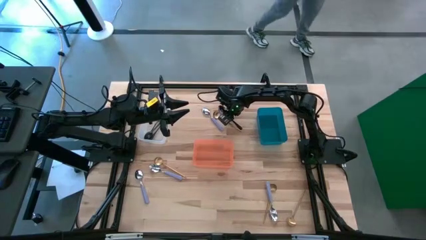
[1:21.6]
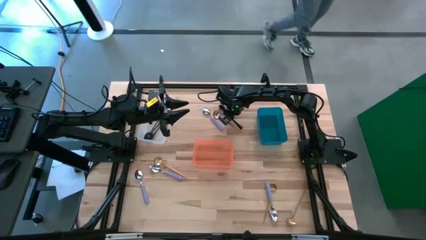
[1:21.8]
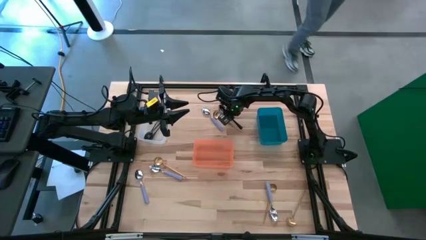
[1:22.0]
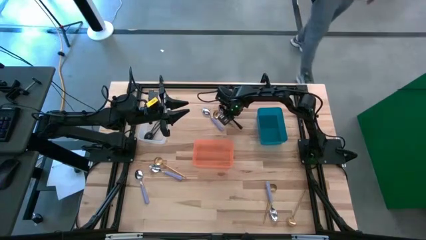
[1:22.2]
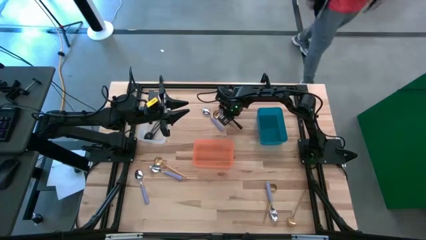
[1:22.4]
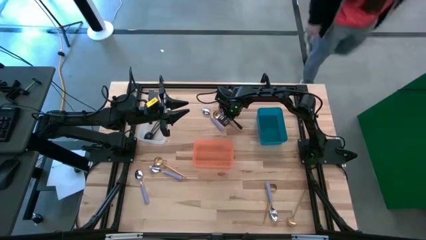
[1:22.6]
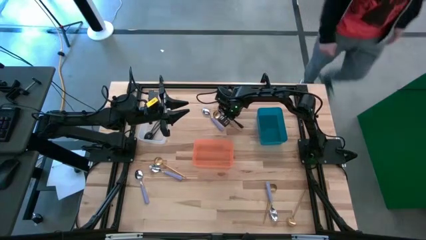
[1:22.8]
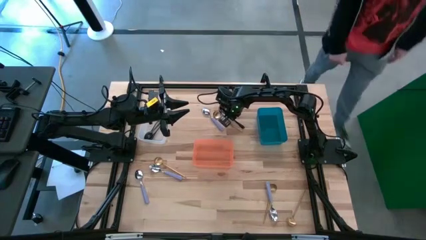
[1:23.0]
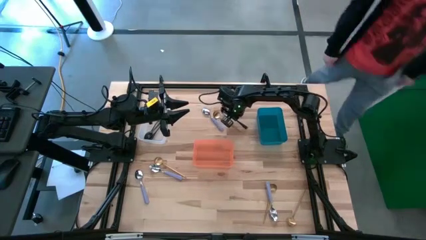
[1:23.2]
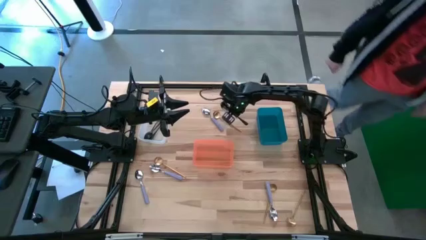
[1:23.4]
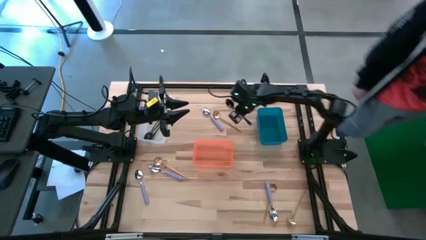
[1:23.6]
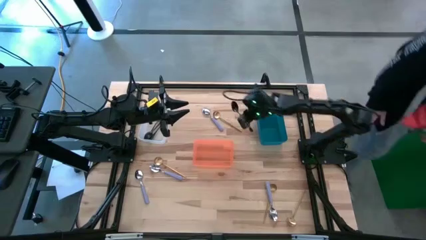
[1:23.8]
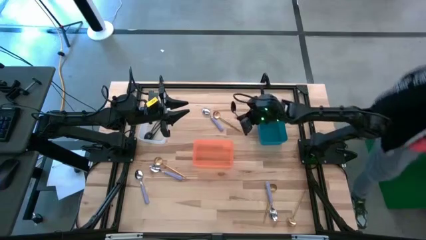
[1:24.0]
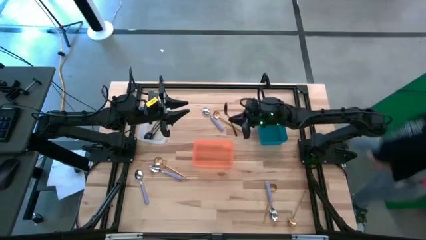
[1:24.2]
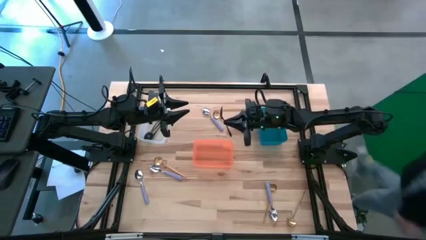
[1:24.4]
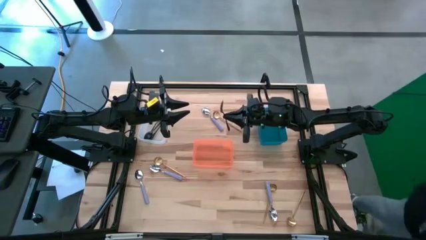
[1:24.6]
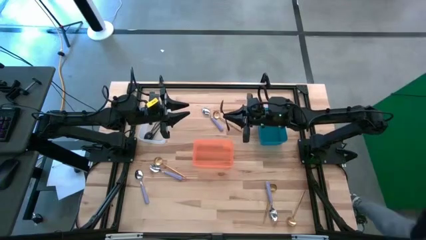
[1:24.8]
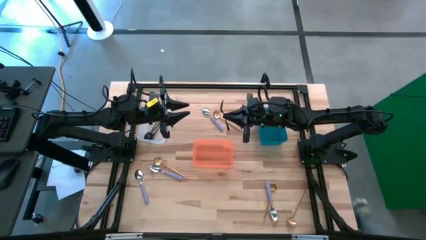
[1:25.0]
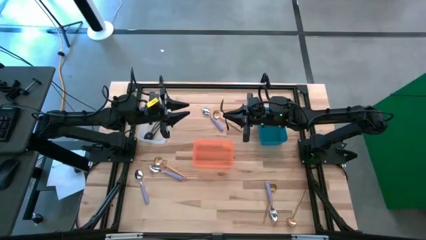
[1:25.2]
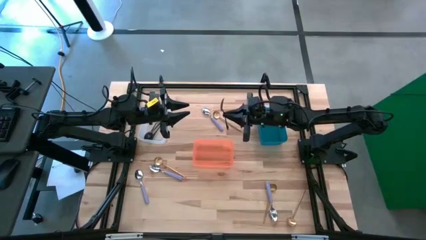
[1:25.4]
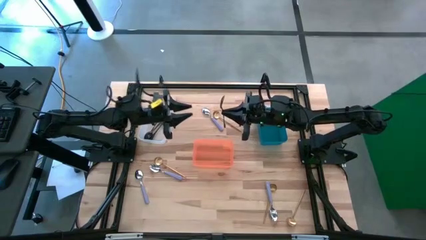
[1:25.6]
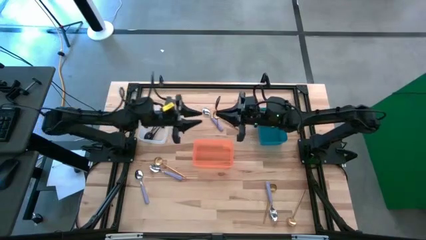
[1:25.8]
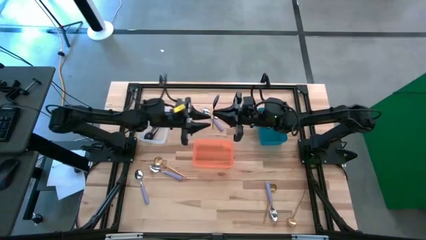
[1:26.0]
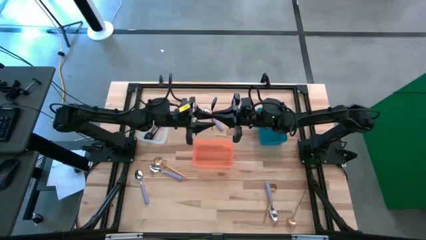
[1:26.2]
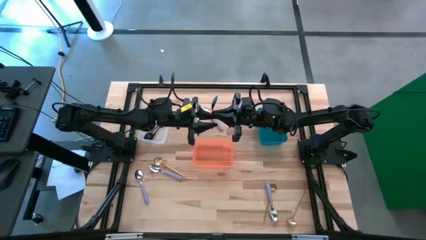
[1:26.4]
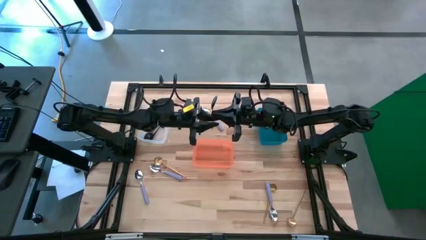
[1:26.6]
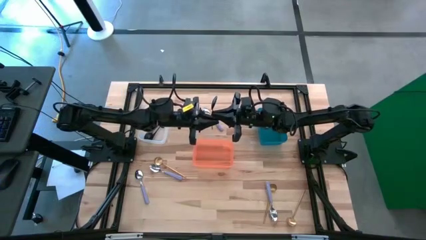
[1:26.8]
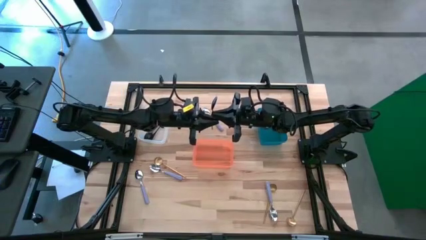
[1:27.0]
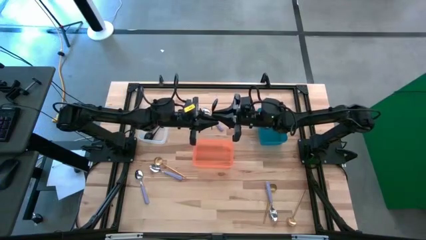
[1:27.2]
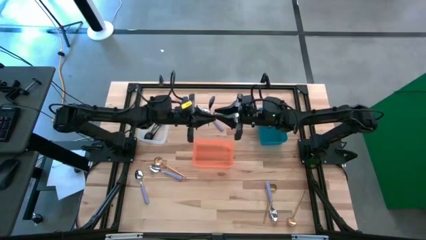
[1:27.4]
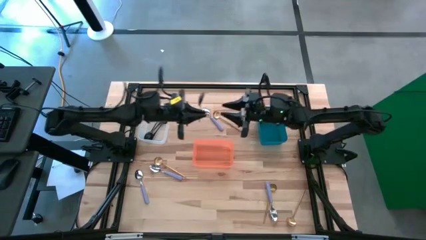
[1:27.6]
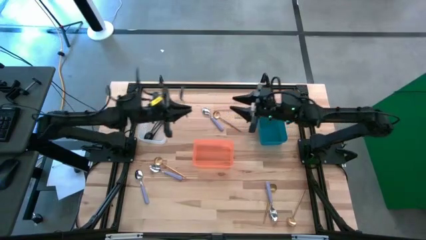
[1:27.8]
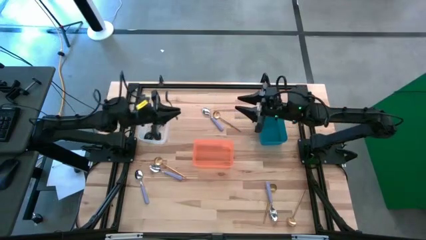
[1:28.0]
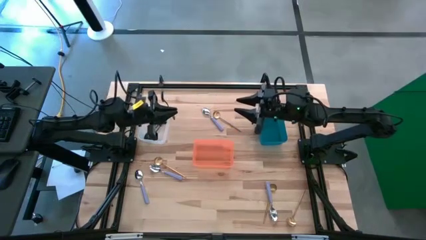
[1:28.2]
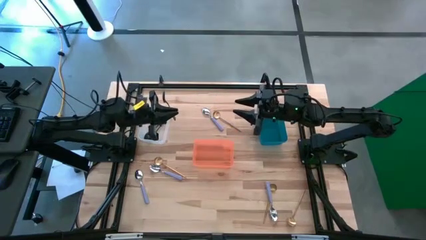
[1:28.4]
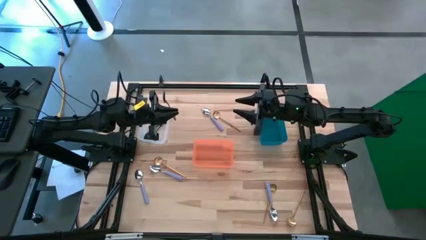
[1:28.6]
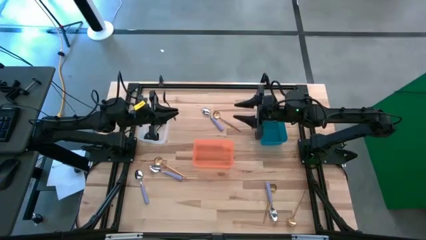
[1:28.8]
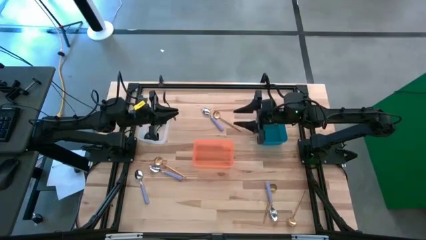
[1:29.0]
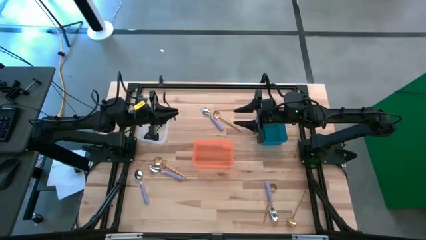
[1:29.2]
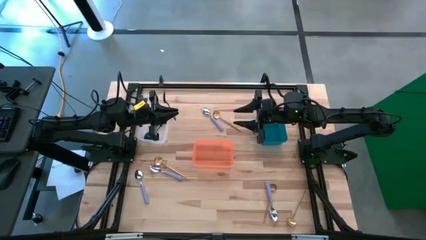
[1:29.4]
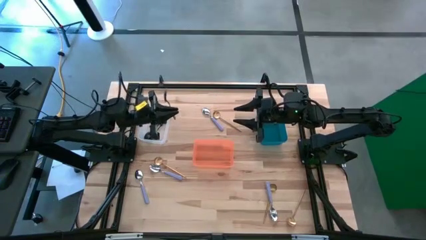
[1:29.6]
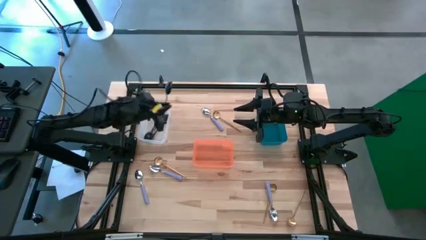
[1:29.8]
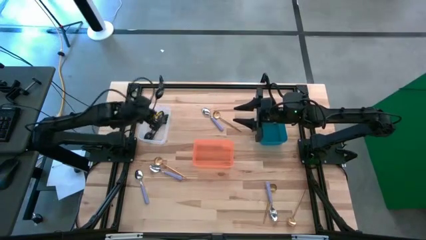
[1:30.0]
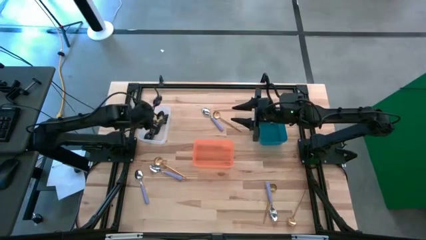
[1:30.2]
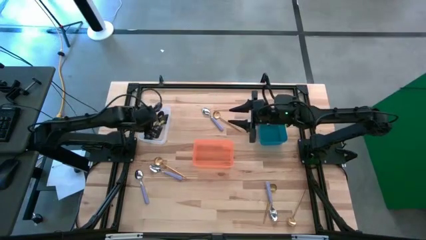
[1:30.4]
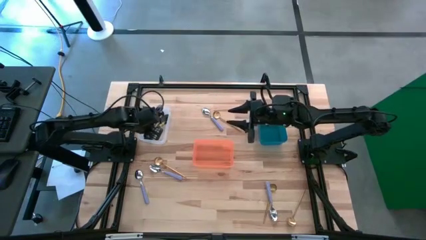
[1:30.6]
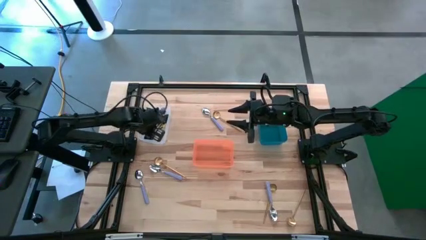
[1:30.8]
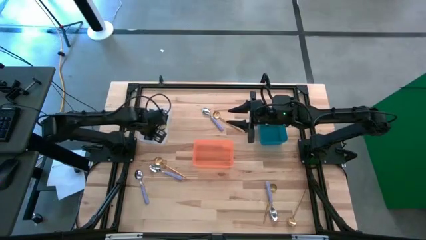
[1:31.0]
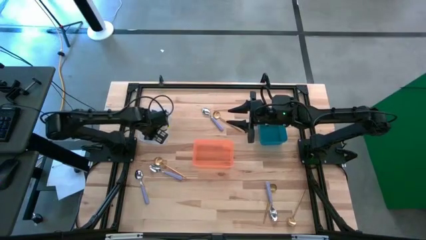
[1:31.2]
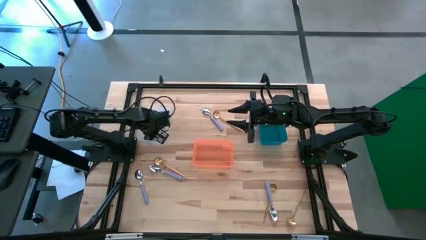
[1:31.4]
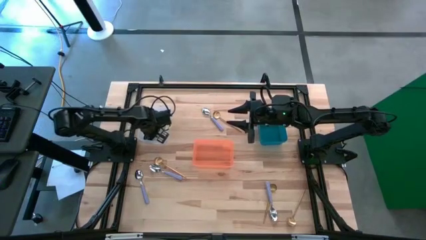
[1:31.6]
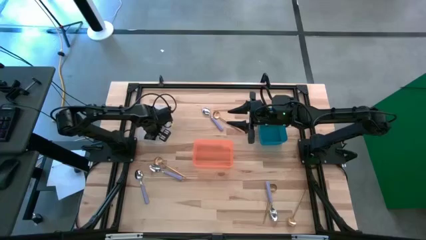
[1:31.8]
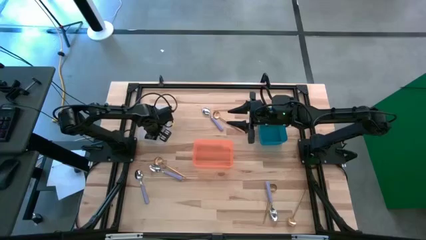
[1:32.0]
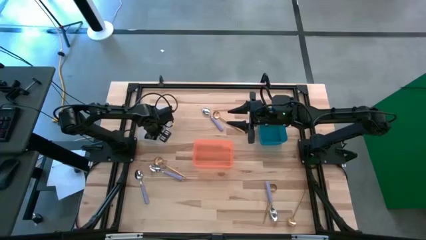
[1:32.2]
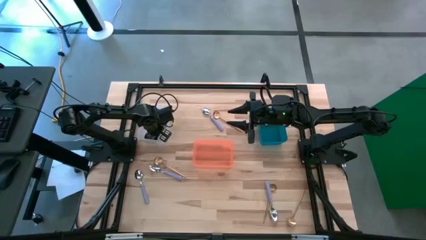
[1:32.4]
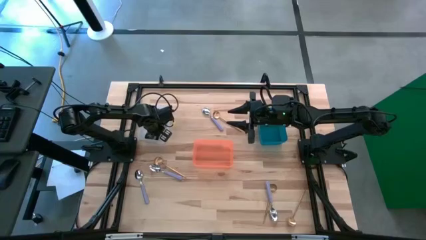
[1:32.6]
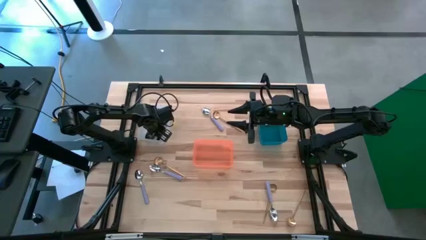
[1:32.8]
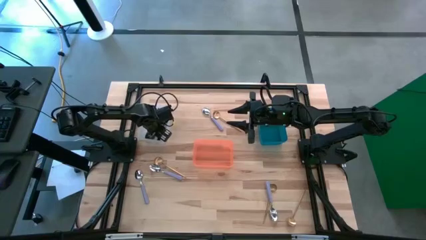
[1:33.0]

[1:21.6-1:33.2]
Task: Sort silverware by color (type)
Put the black spoon into the white bin

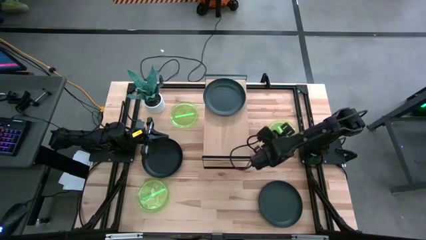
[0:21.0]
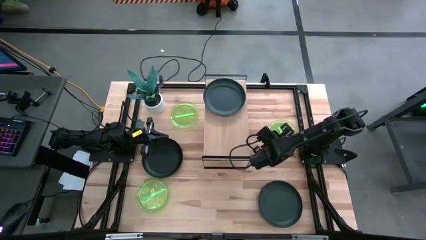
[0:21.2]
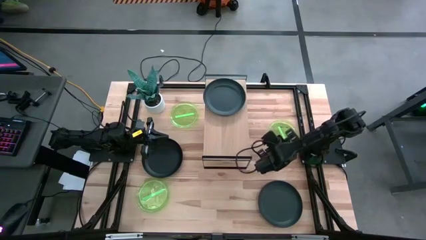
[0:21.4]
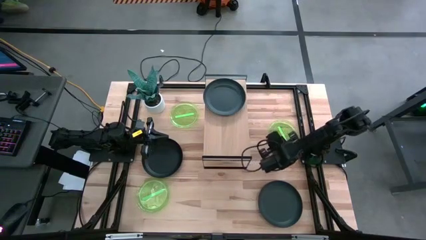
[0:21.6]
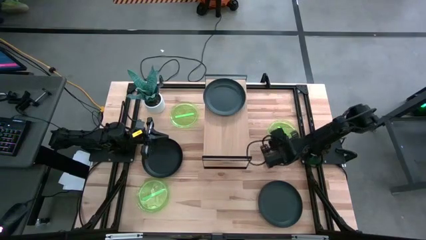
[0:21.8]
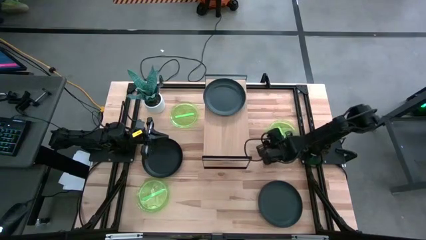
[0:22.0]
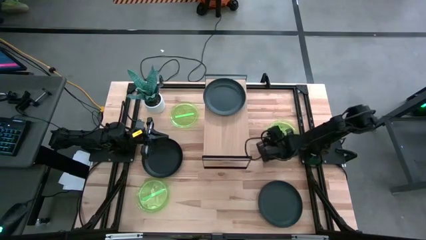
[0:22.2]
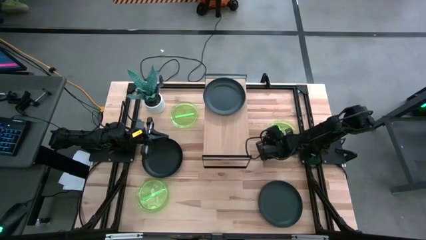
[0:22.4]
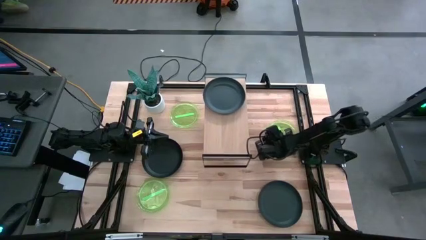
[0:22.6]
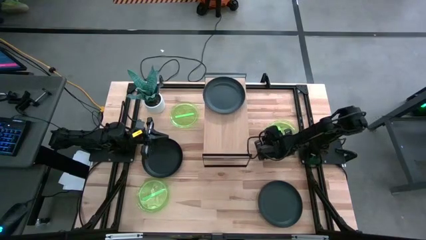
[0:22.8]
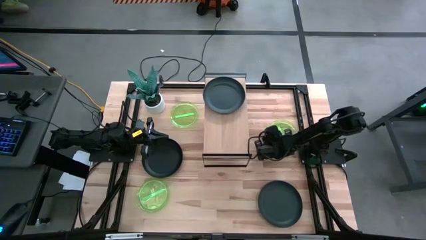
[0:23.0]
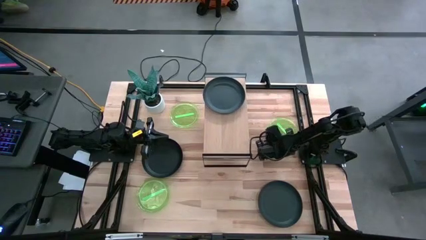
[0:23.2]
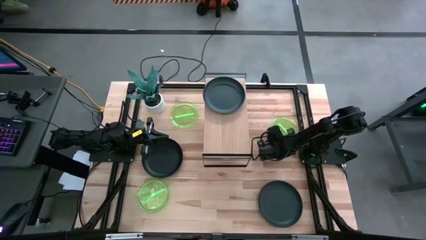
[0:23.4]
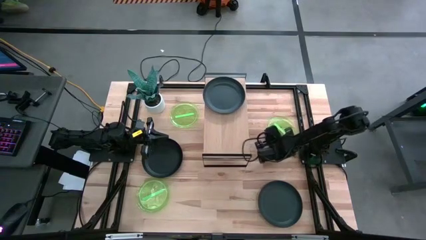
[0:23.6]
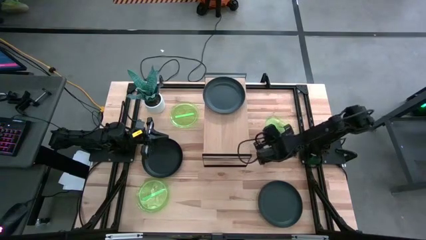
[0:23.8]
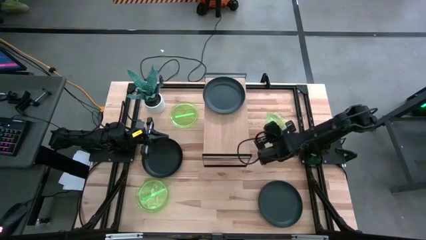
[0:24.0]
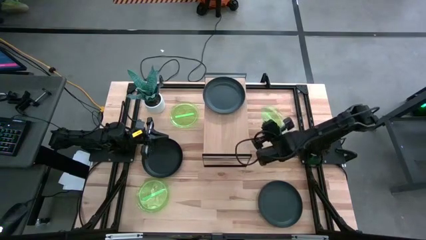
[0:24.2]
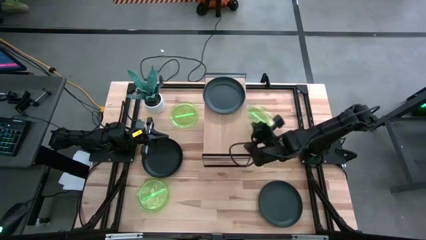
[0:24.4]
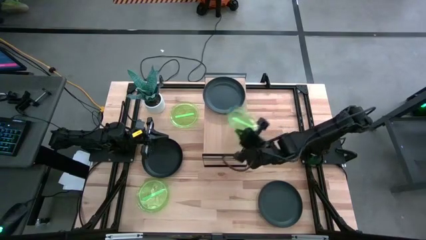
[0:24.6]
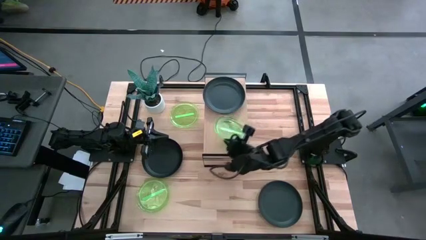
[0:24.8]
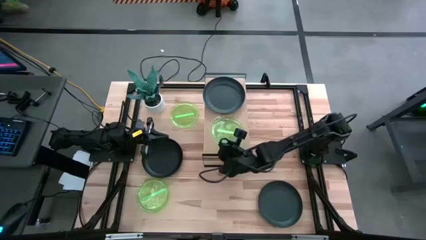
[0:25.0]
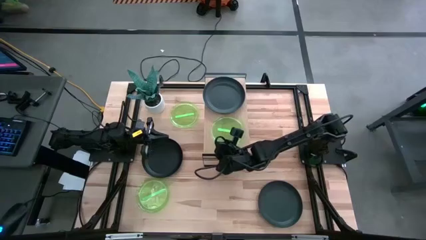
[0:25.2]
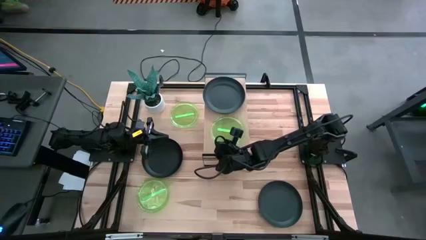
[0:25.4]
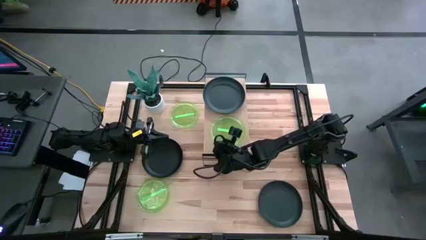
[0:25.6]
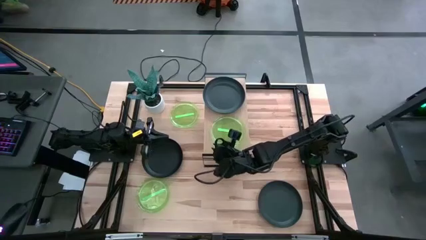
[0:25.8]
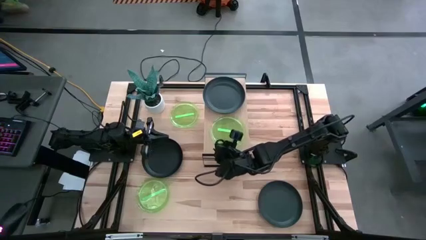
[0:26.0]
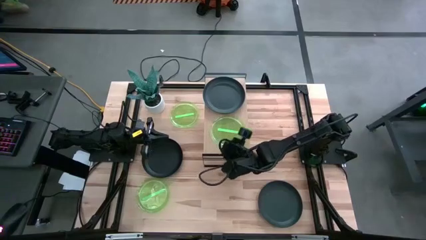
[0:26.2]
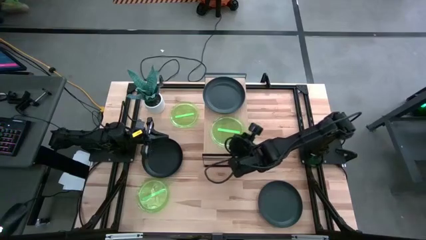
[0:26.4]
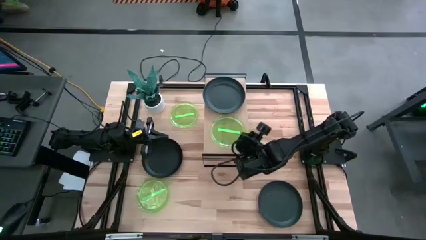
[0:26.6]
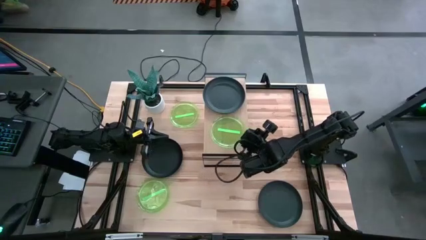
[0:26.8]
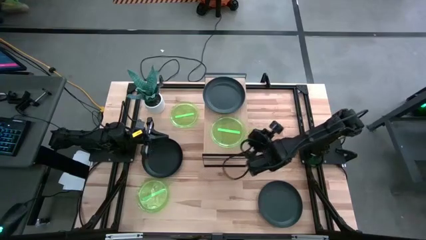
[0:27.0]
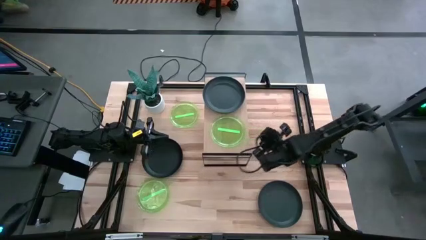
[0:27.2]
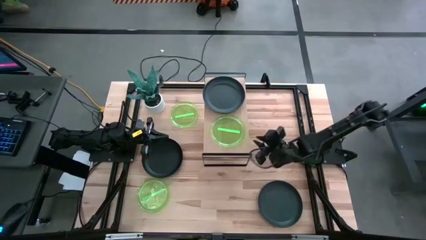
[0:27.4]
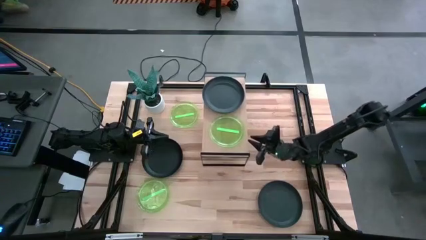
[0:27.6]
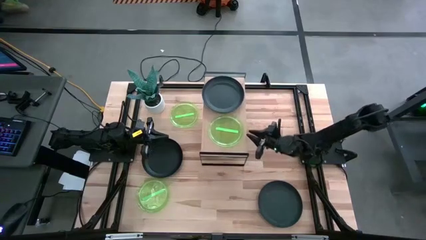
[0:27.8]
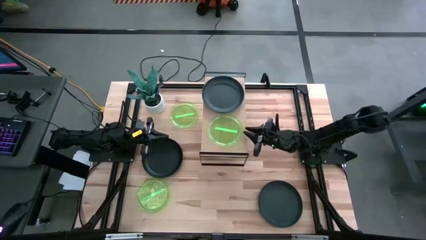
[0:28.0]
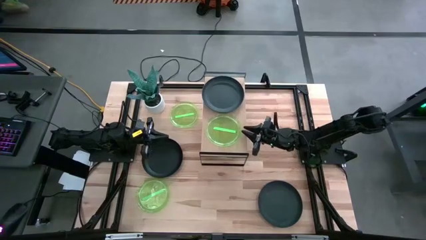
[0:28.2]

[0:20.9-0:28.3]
Task: Place and stack plates onto a shelf
Put the right green plate on the shelf
